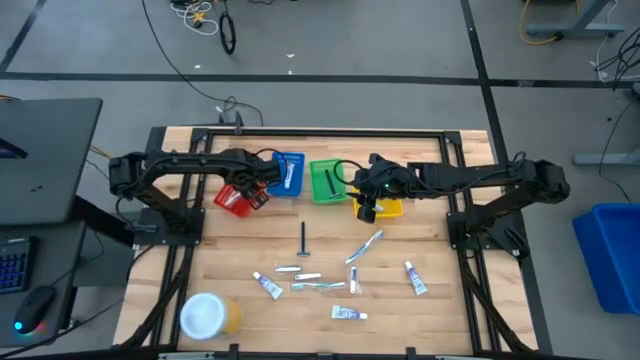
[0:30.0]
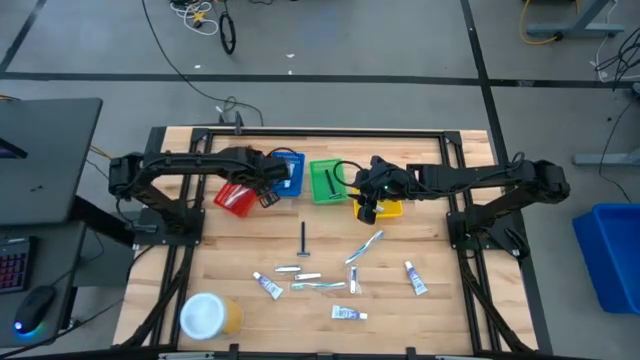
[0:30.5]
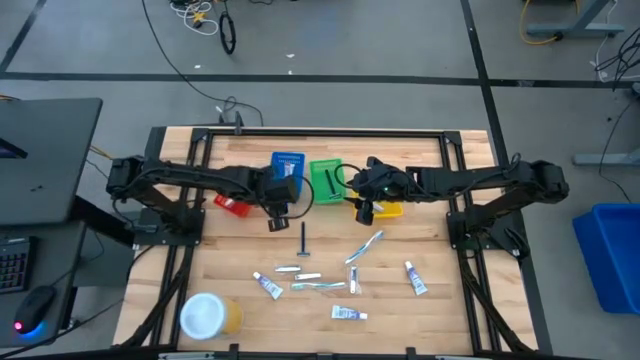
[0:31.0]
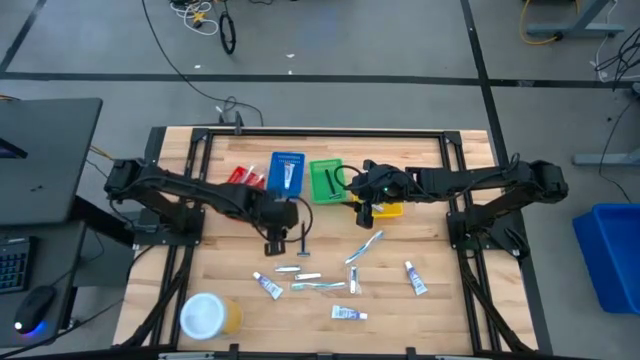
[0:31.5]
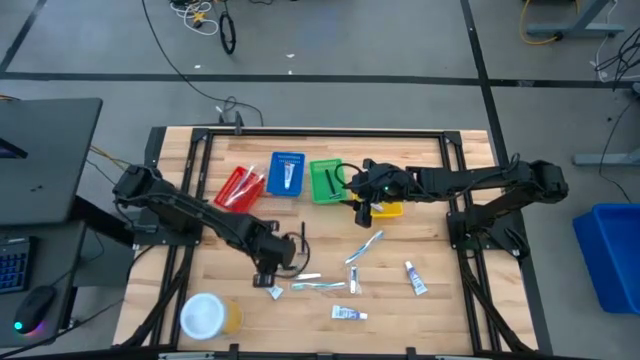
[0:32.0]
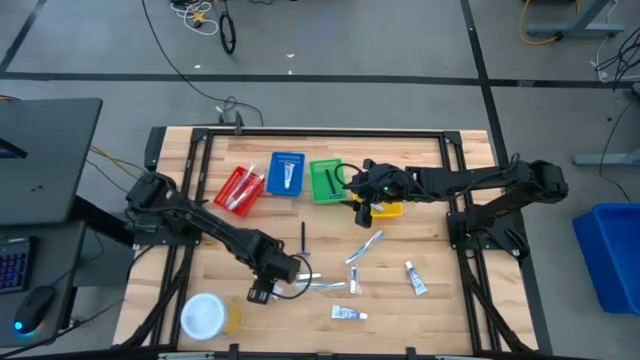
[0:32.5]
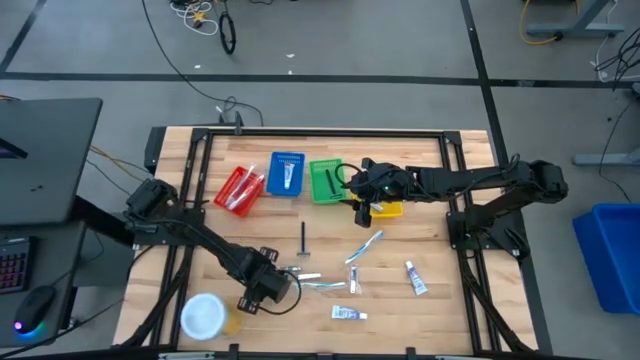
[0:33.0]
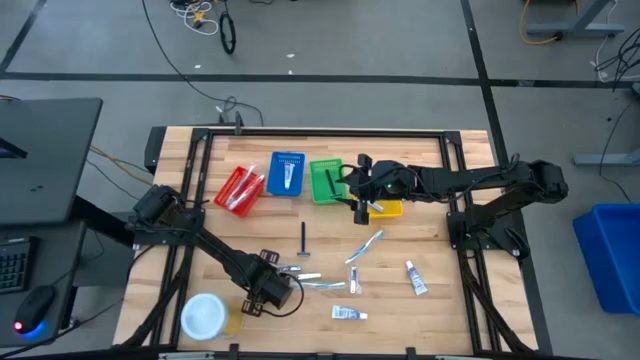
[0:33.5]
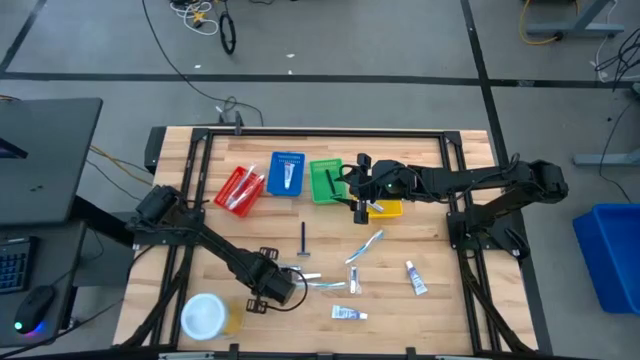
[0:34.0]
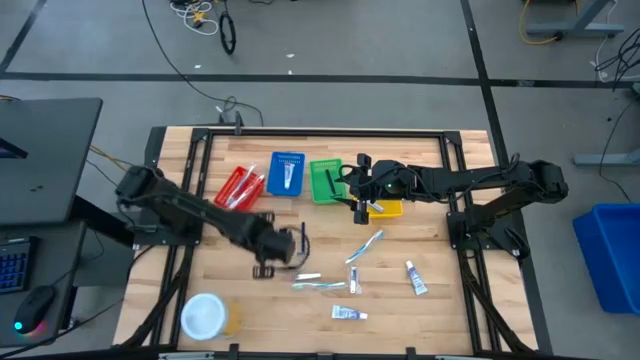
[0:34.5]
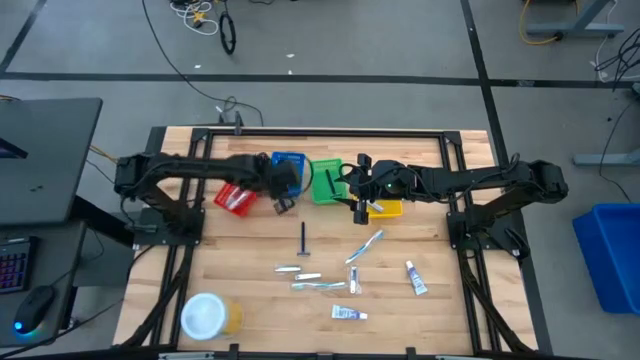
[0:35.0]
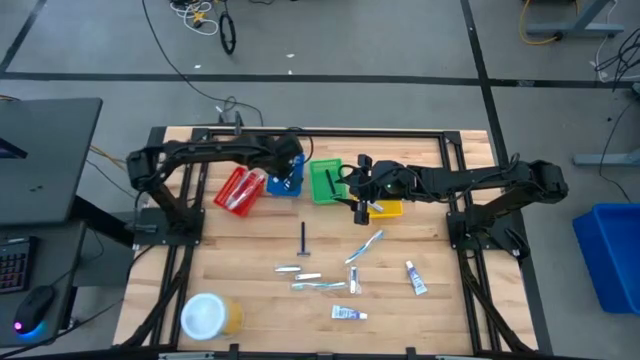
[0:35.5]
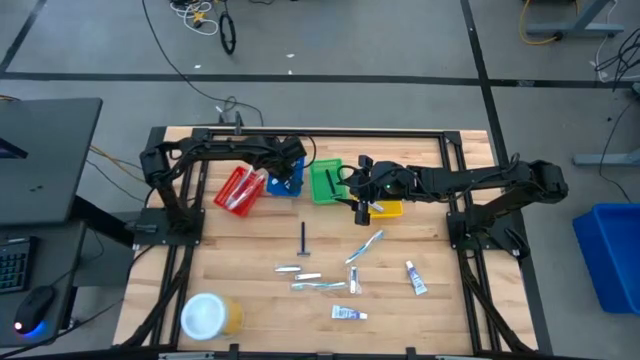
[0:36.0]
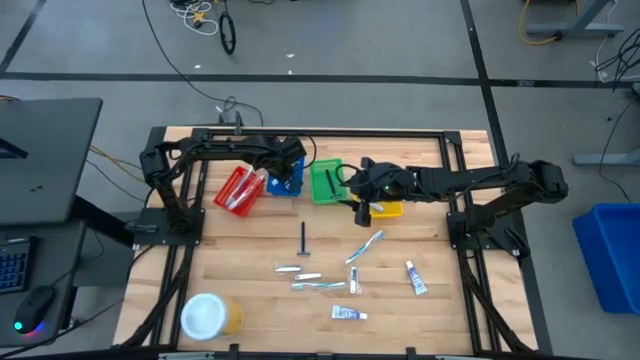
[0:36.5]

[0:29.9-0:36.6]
Task: Pick & Place Travel size toiletries
Put the white toothpaste into the blue bin

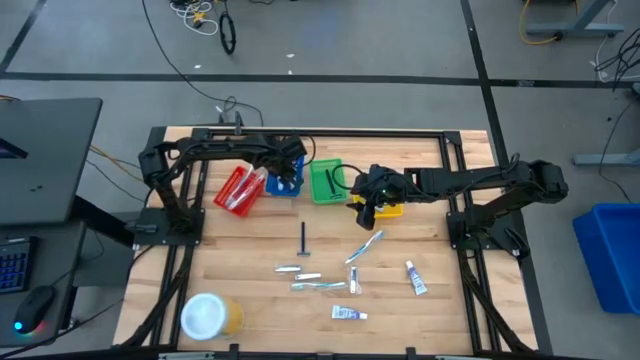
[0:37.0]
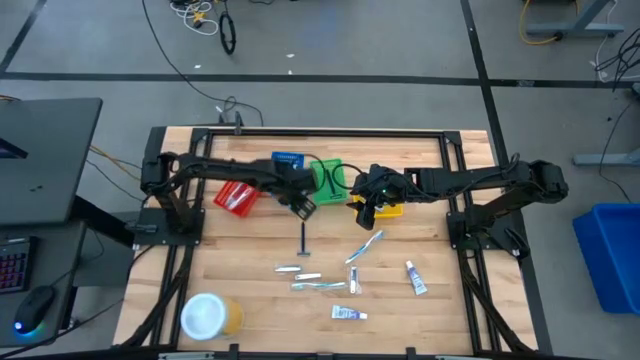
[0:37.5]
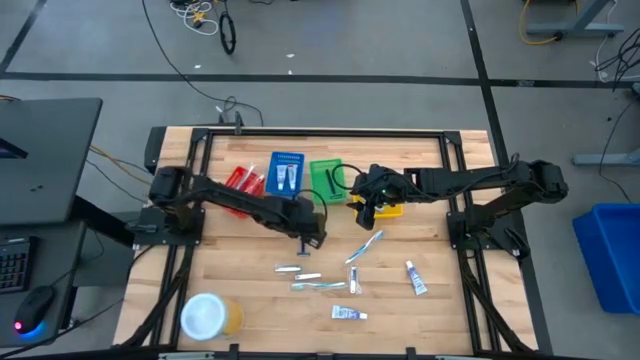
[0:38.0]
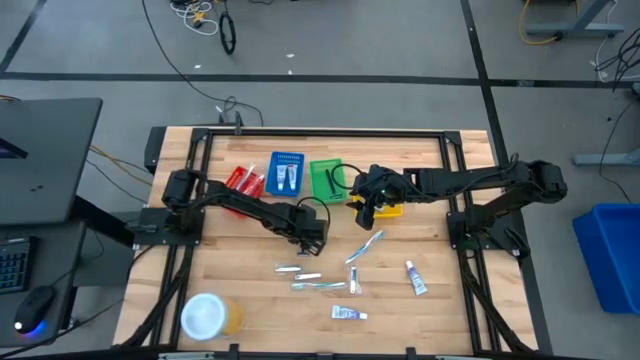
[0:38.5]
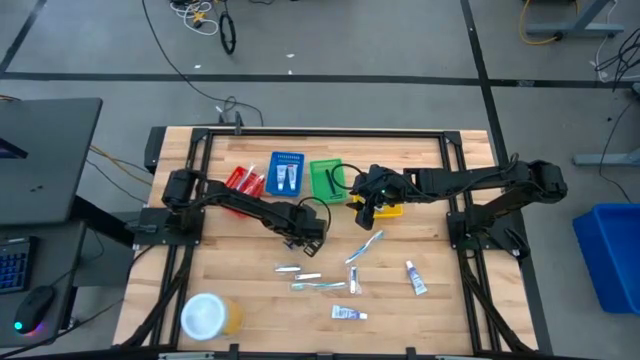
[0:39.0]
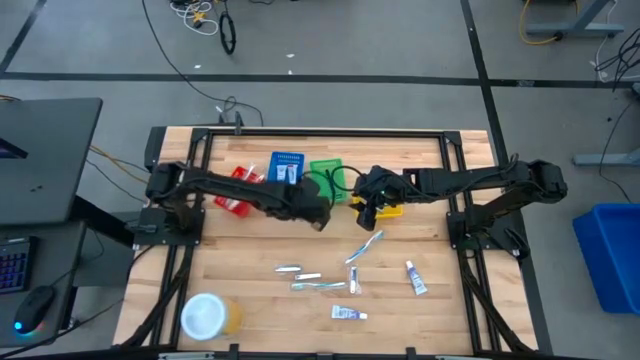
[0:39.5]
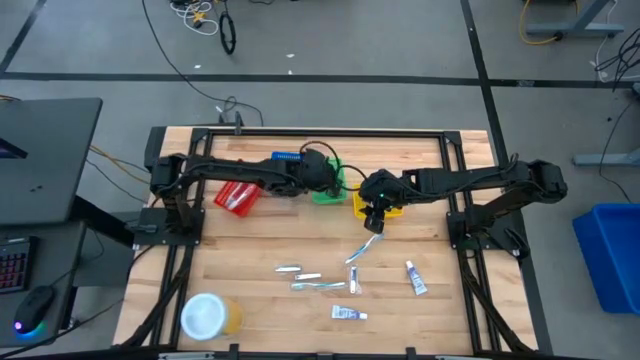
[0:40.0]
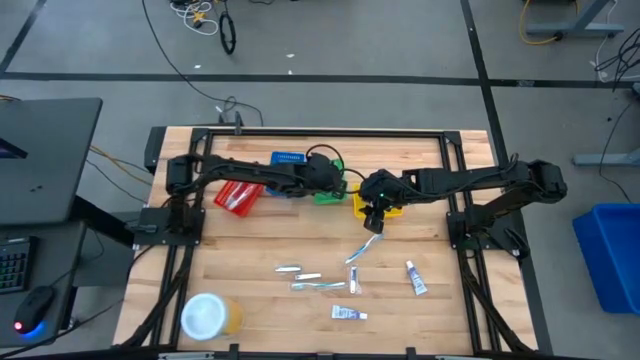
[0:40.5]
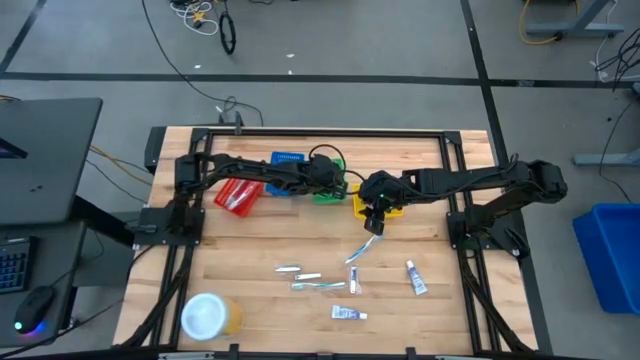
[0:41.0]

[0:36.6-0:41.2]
Put the blue razor into the green bin

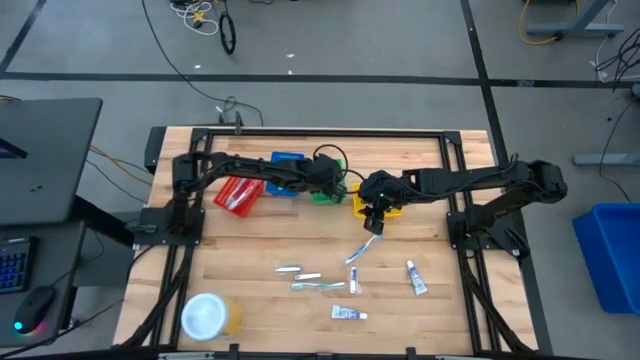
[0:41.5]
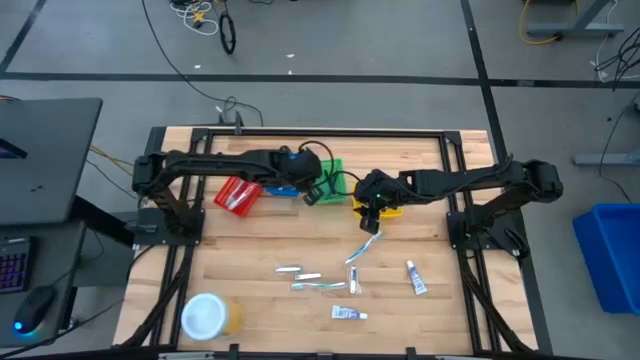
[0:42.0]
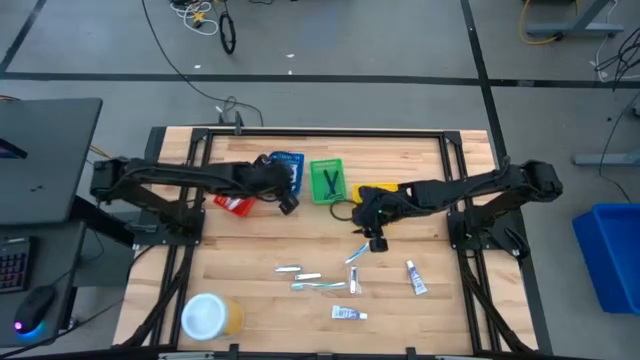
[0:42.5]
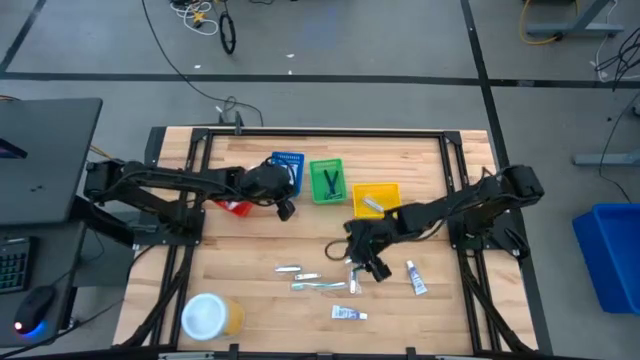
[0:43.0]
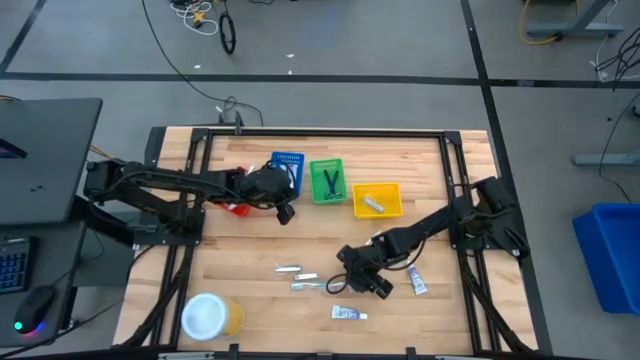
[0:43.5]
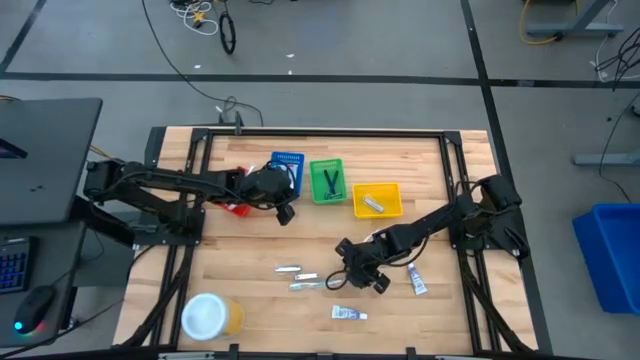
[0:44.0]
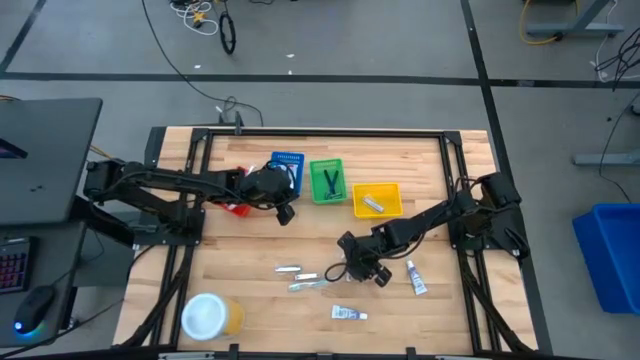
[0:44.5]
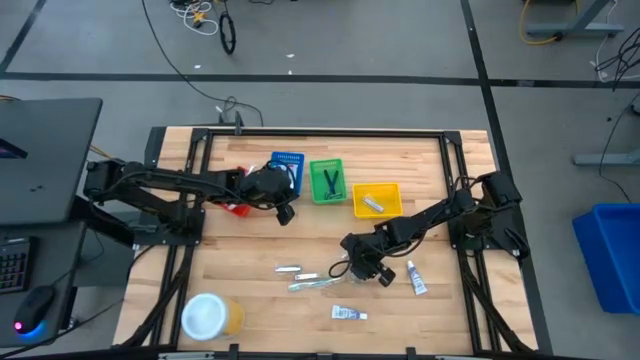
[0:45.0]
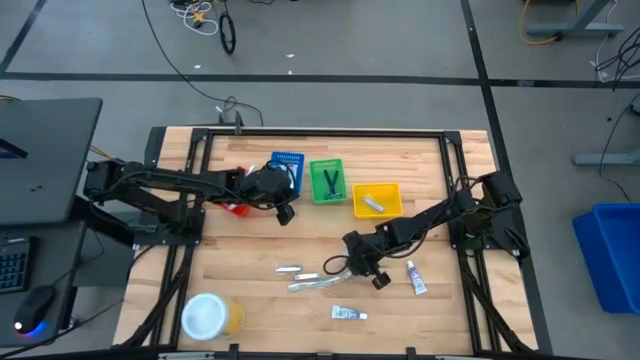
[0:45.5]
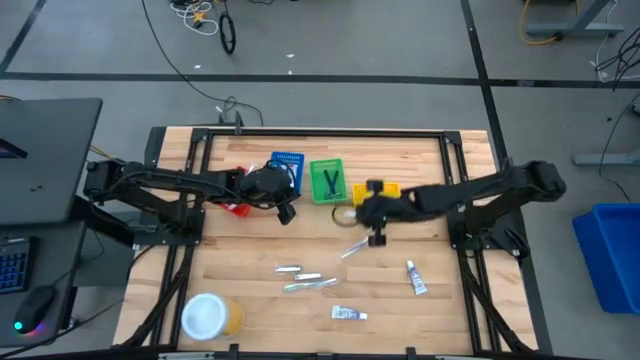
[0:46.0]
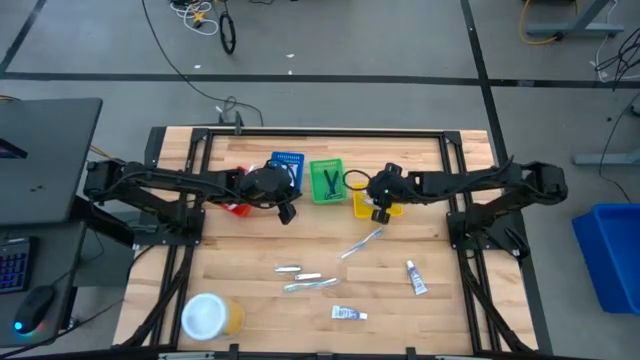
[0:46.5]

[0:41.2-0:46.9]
Put the silver nail cutter into the yellow bin

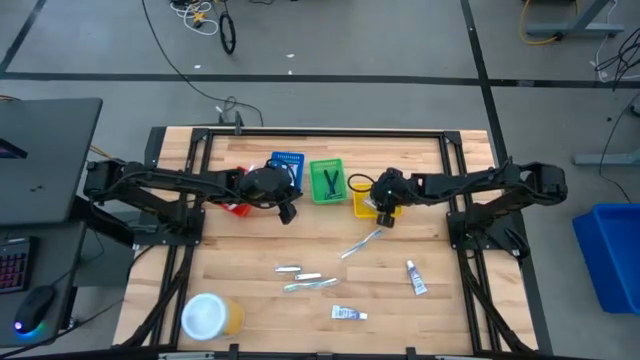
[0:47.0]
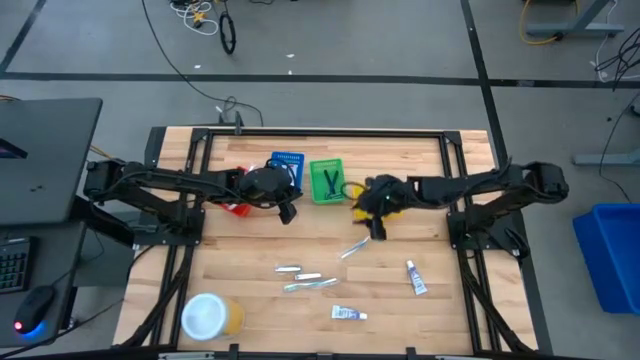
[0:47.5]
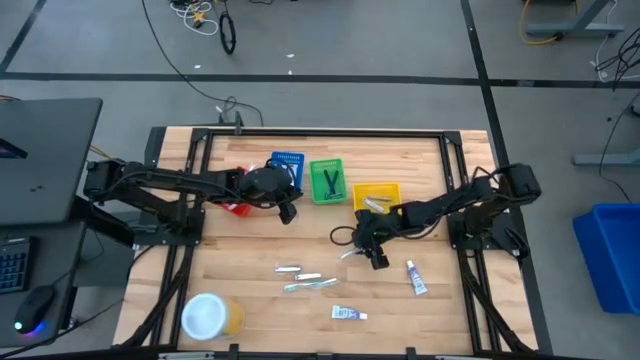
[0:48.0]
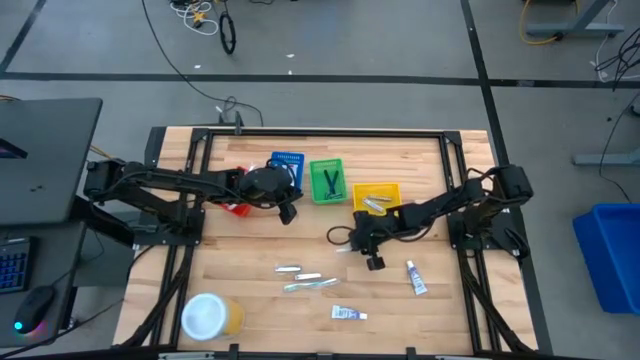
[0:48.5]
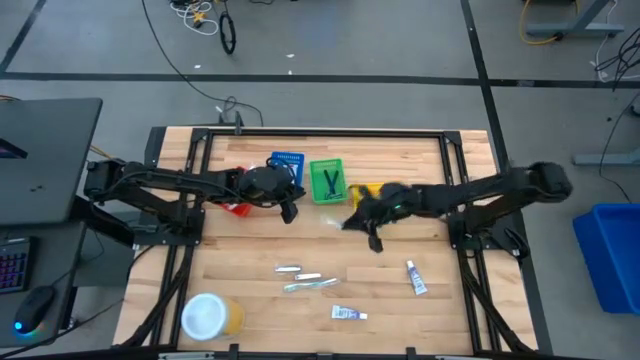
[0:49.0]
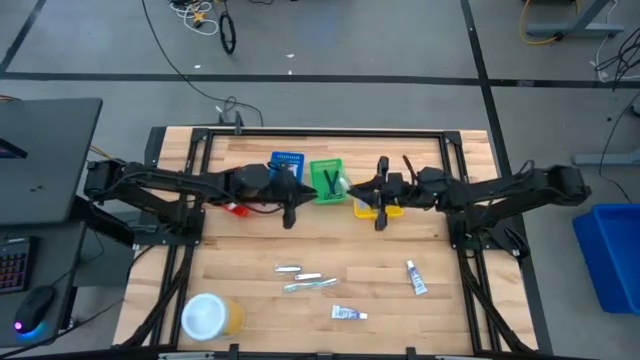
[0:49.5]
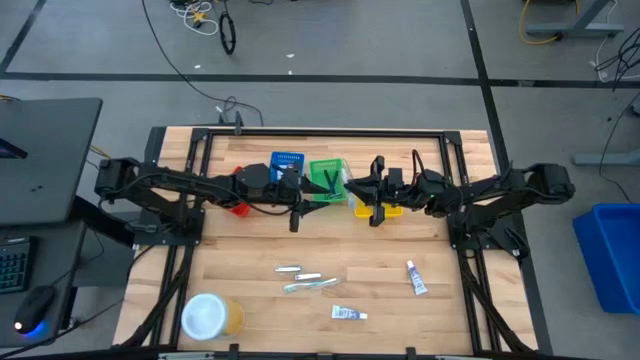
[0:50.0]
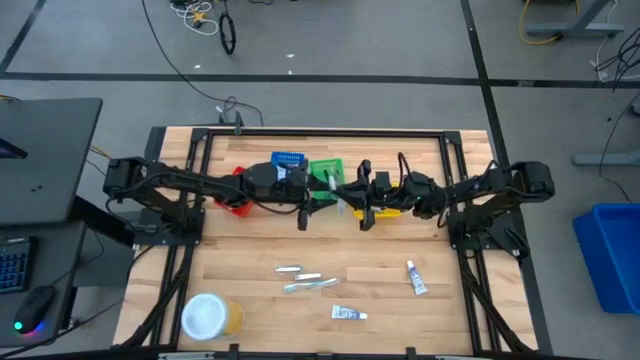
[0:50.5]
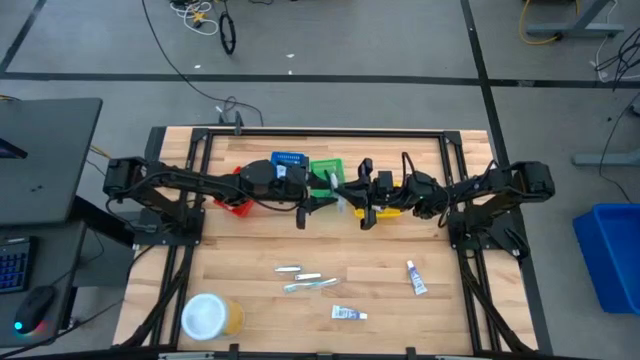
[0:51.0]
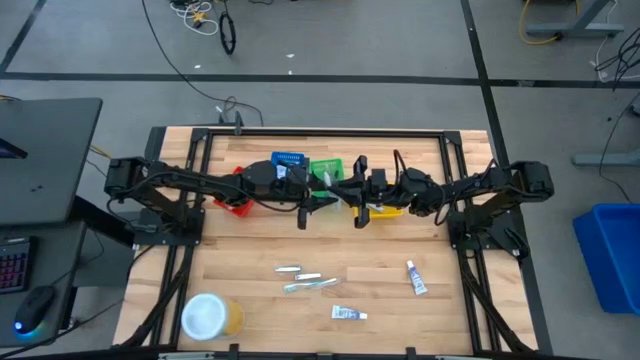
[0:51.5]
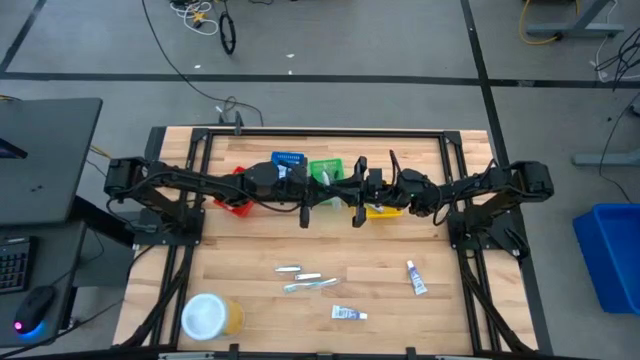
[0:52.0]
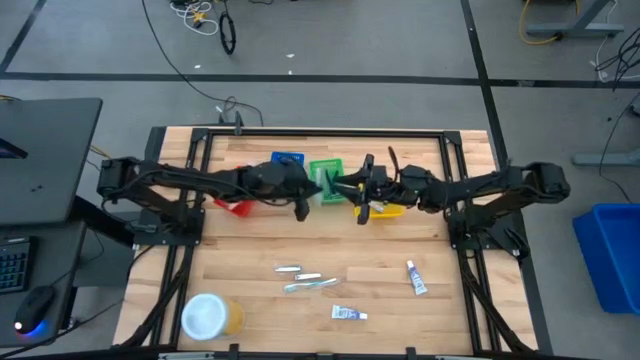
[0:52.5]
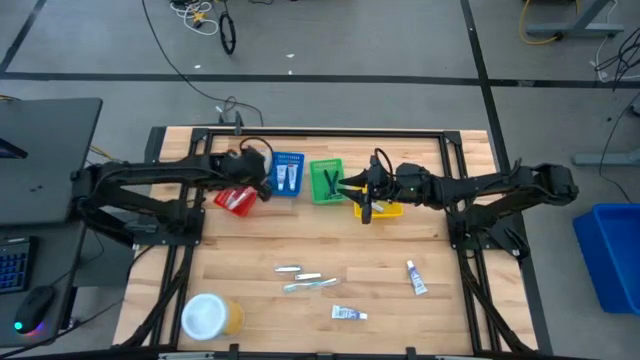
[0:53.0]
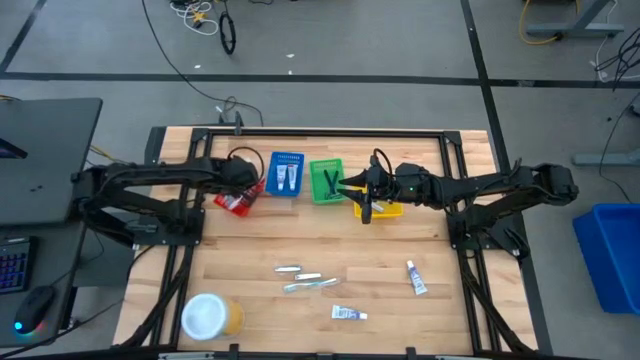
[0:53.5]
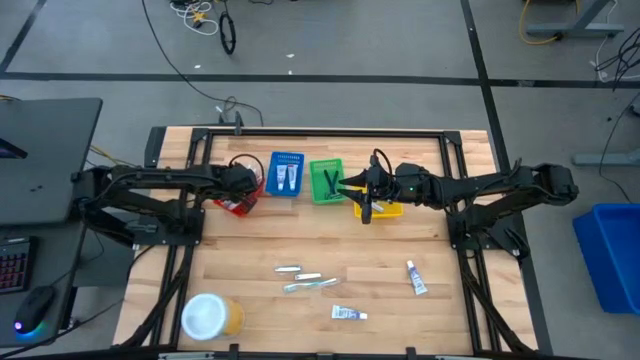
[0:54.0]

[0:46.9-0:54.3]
Put the blue toothbrush into the red bin
